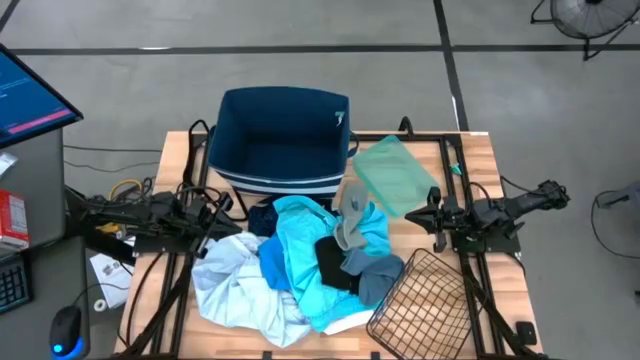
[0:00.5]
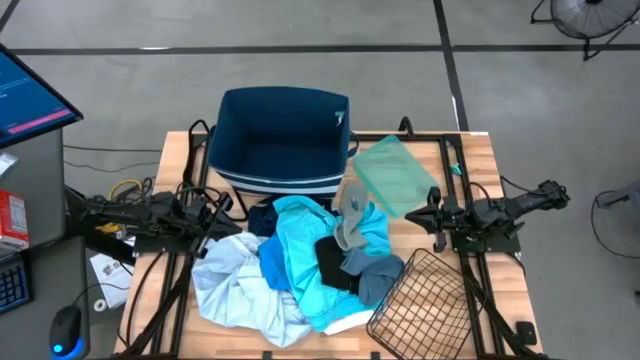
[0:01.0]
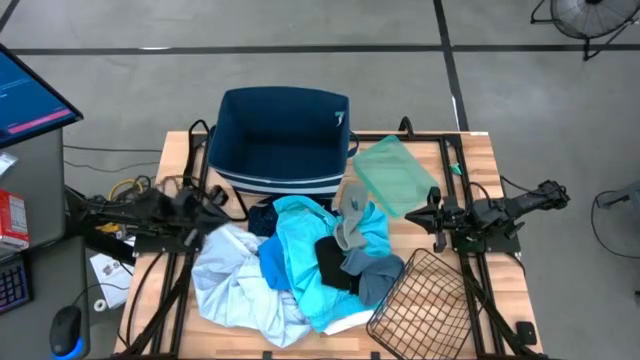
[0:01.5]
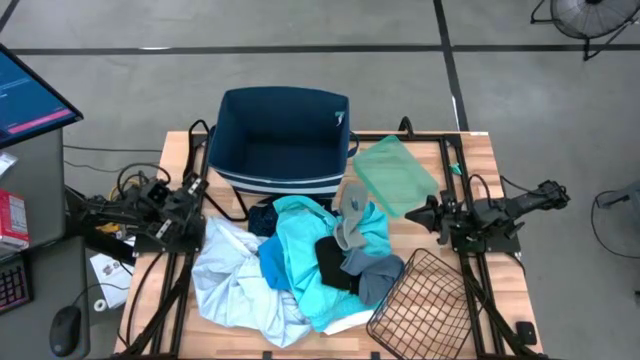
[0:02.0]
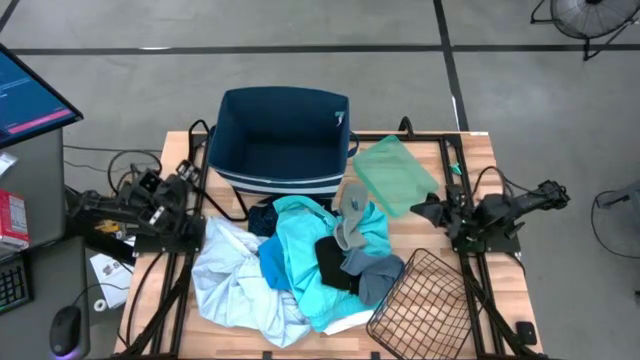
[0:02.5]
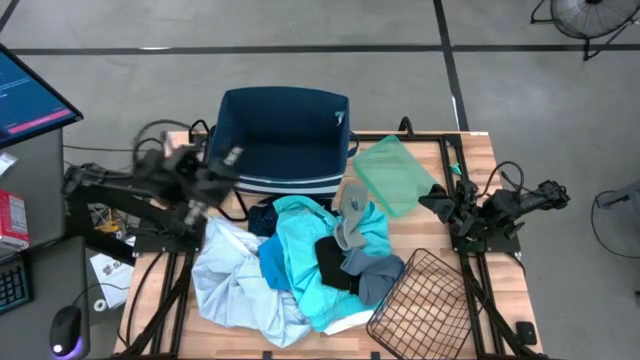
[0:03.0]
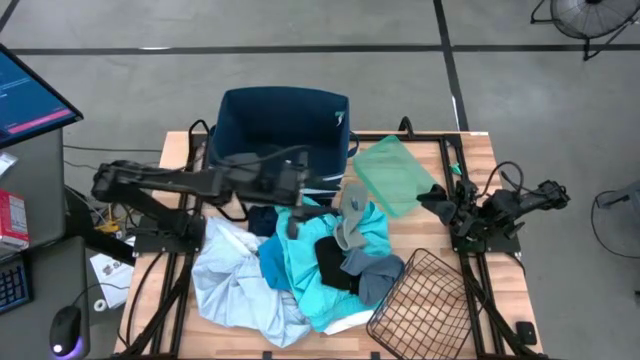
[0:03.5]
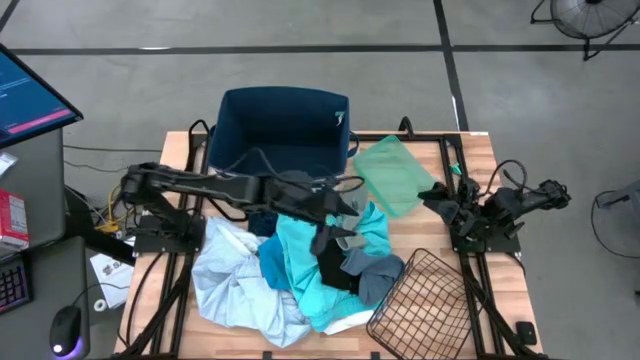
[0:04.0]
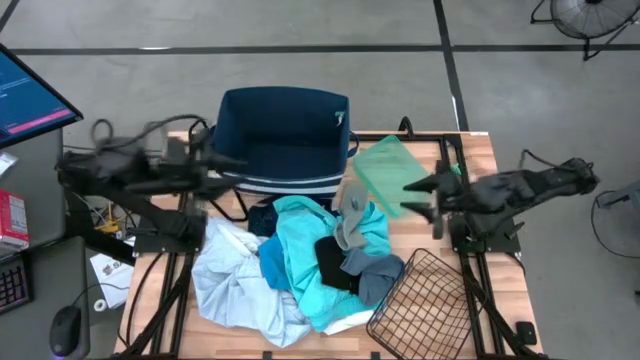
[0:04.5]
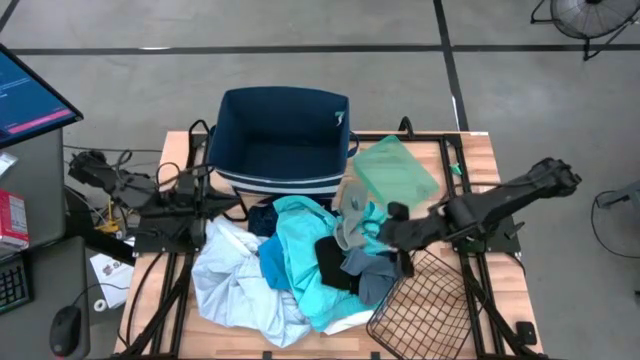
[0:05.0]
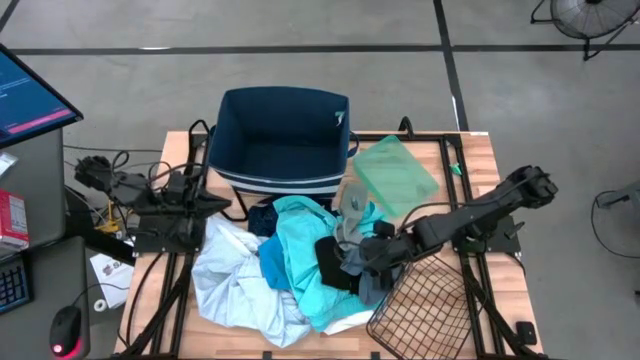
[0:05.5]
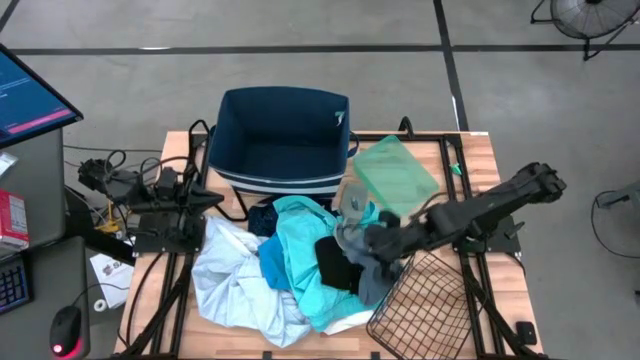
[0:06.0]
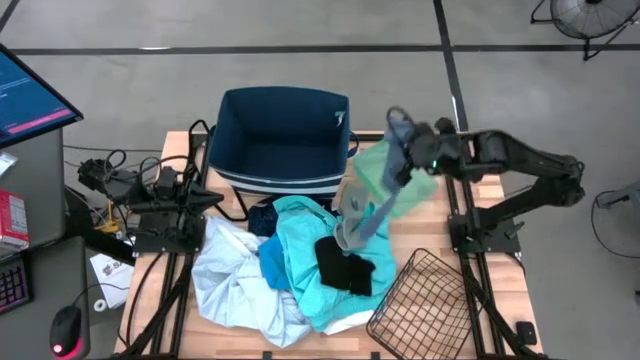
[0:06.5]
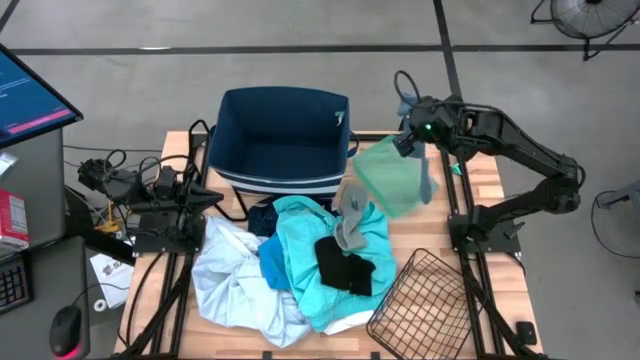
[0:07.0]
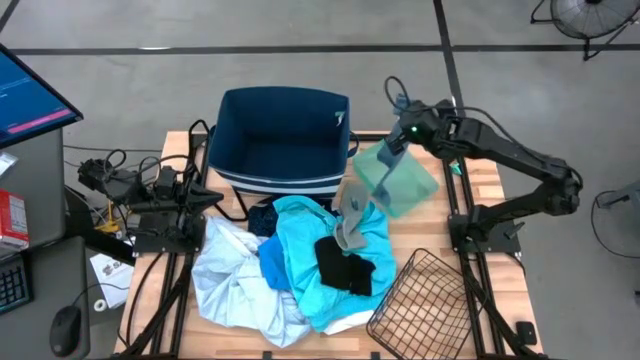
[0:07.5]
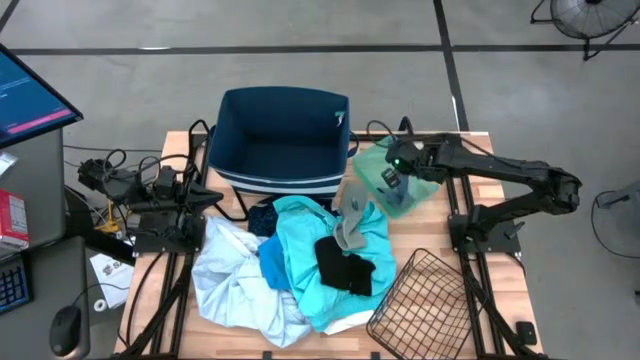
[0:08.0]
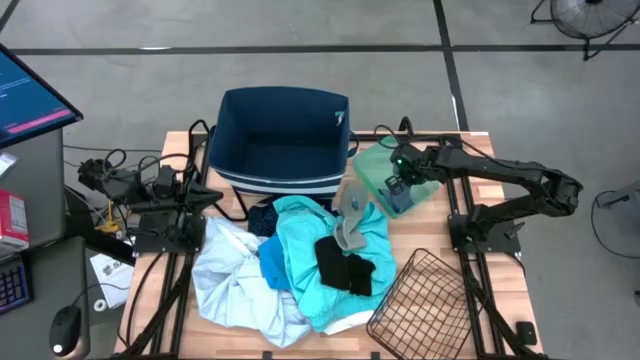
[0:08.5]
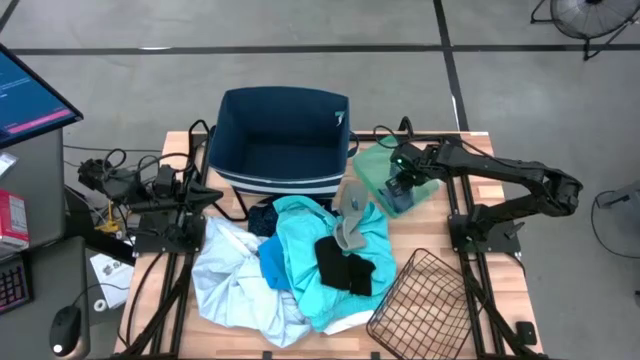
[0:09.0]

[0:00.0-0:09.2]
Task: Pick & Place Cloths
Put the blue sock into the green bin

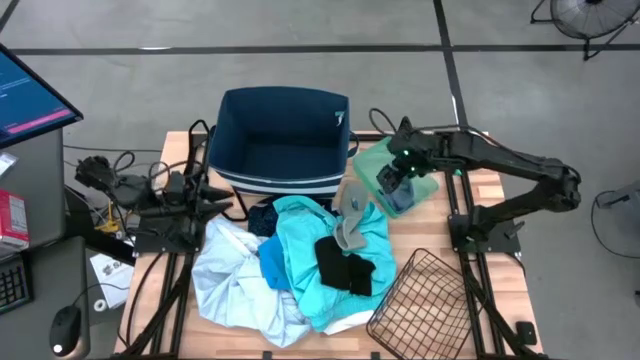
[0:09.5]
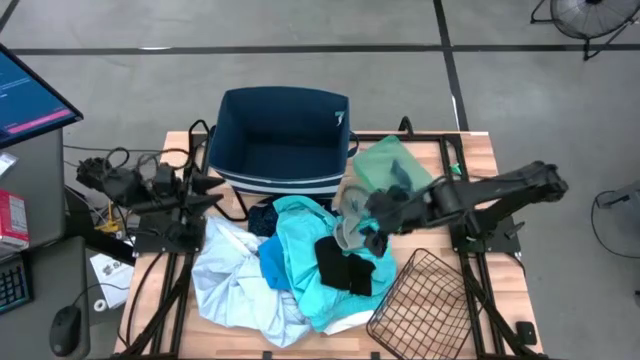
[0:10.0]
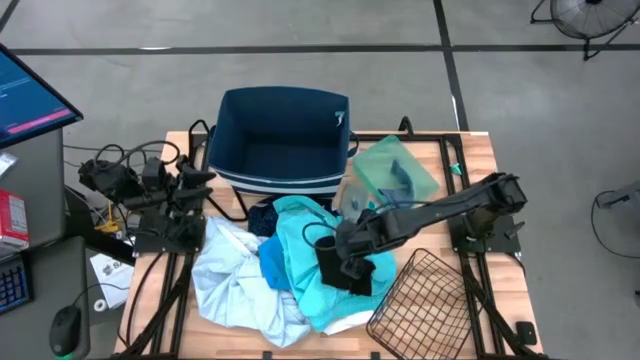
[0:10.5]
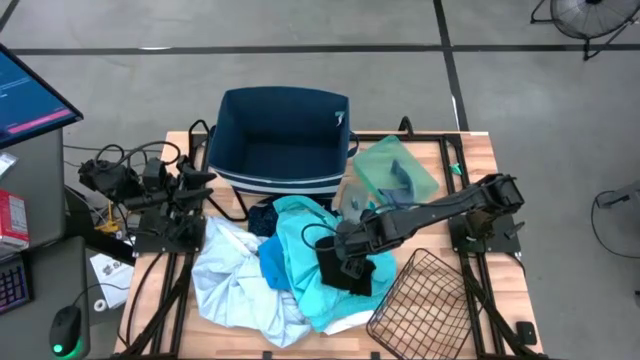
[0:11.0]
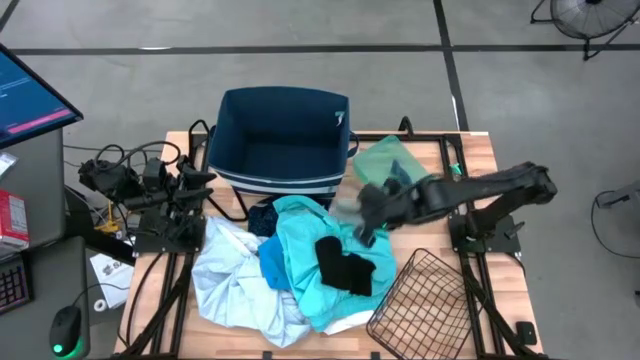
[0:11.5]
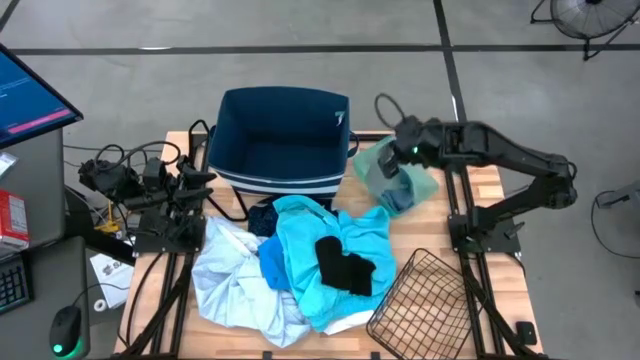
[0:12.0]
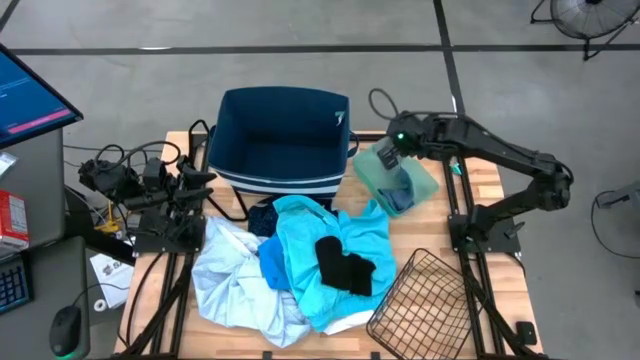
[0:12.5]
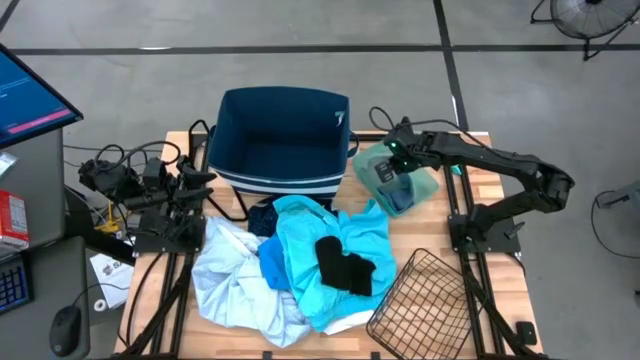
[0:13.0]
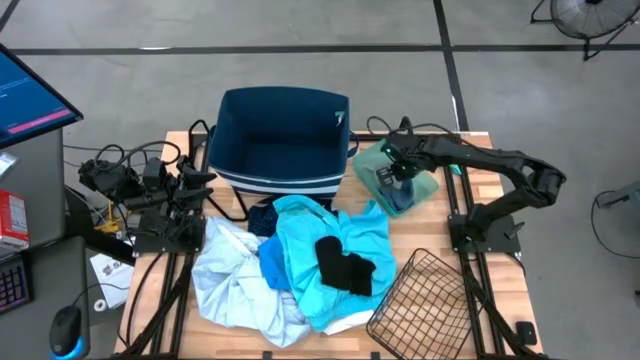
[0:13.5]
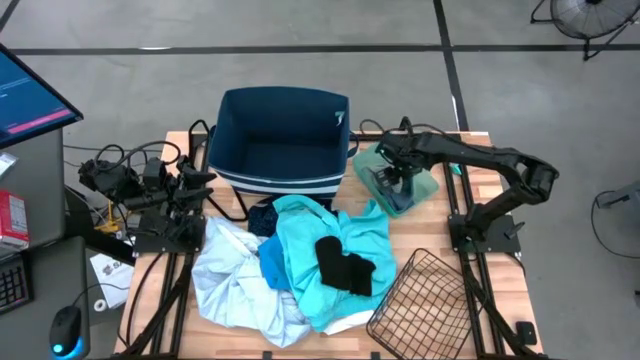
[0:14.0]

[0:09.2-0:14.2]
Put the gray sock into the green bin

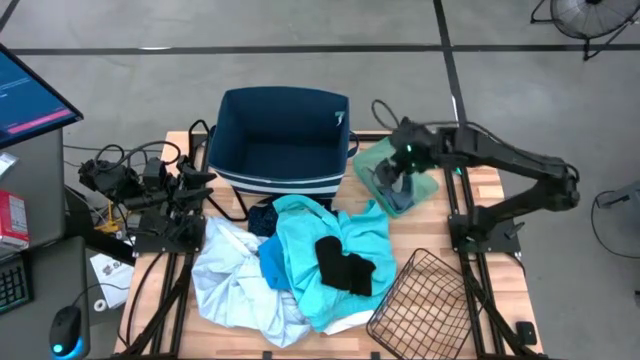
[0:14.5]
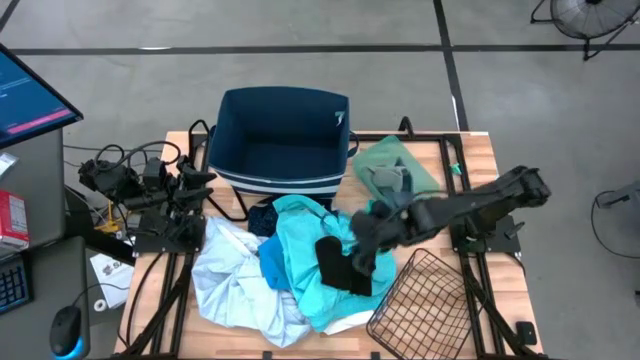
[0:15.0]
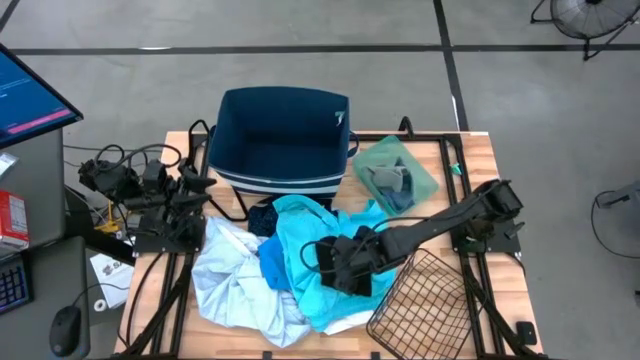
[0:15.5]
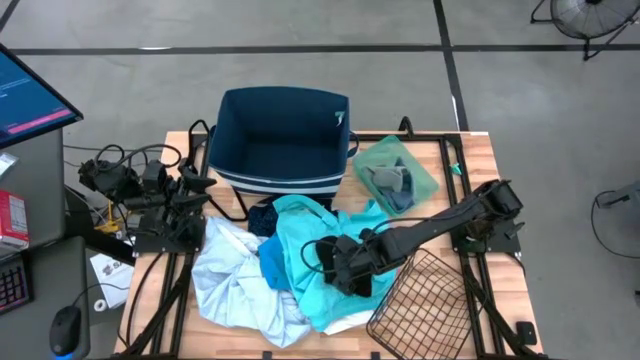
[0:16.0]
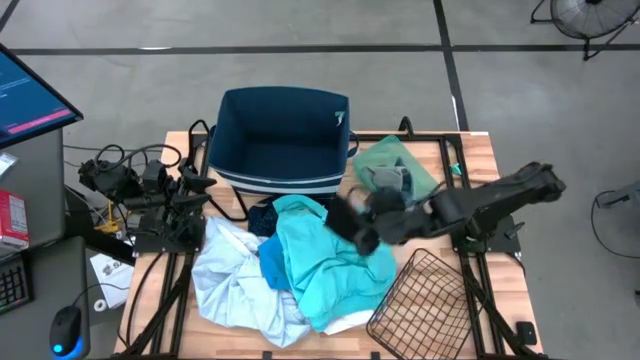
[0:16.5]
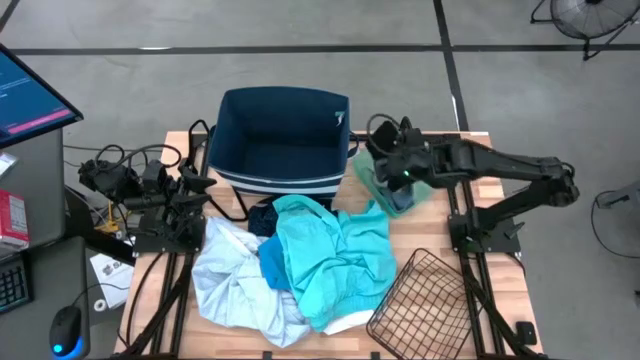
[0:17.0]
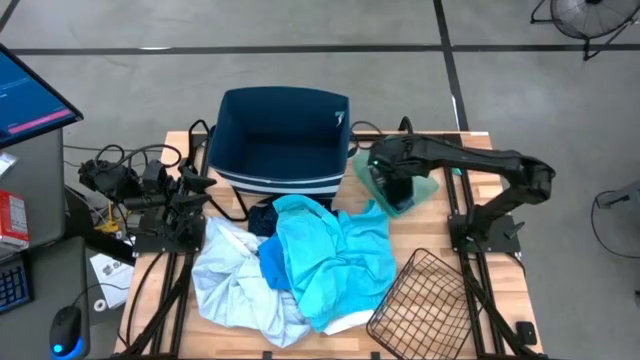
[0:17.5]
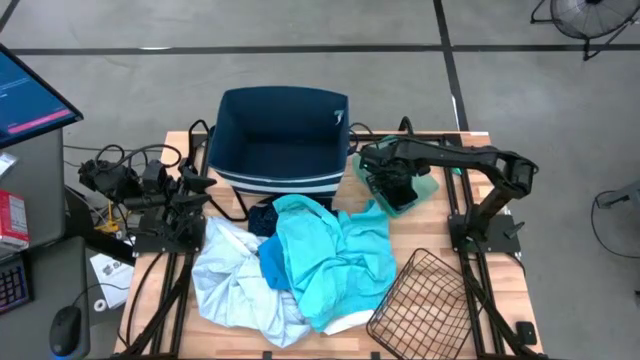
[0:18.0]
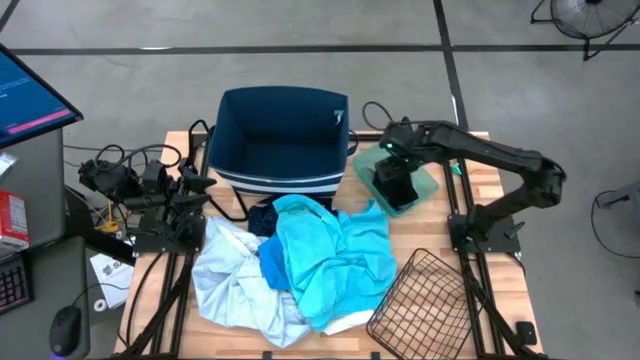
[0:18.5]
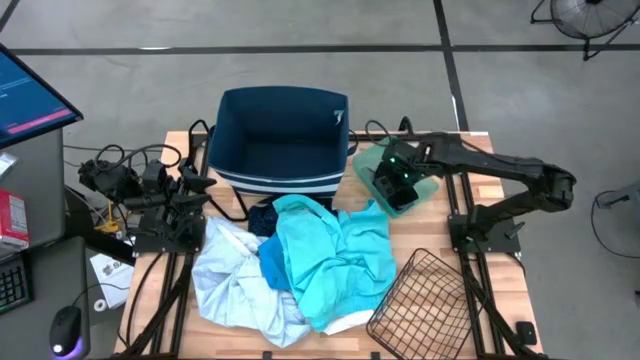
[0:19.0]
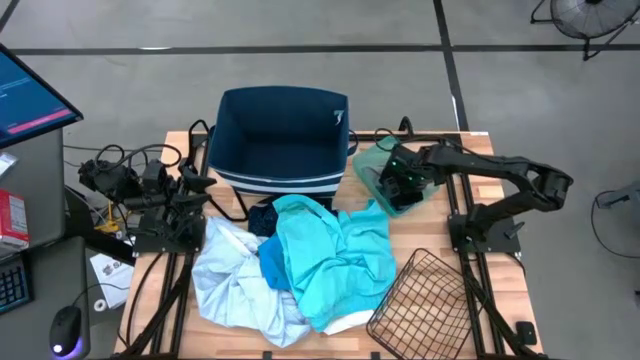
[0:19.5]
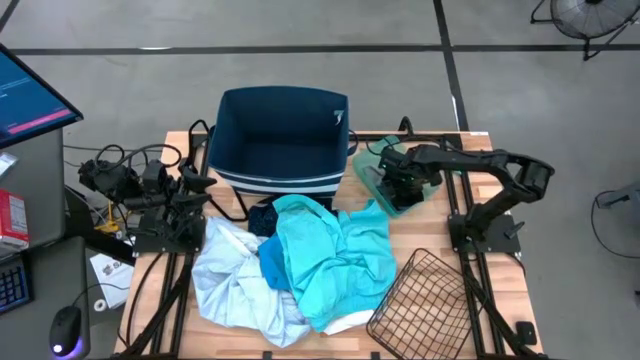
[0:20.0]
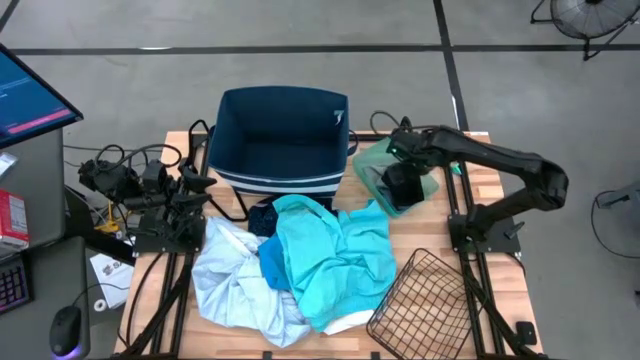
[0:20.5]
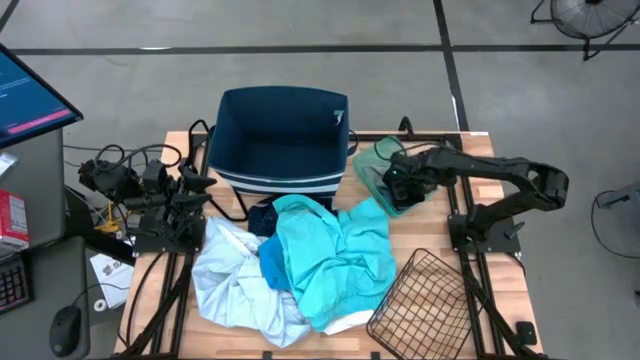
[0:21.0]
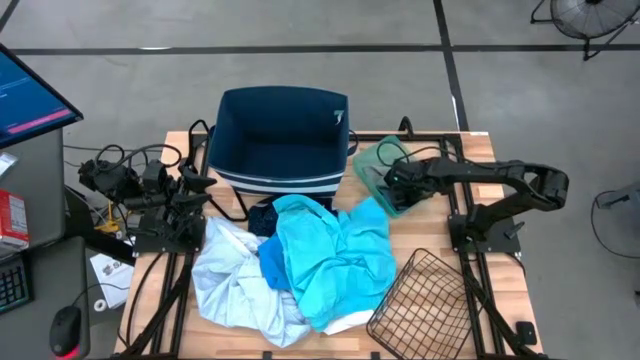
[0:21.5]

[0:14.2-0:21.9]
Put the black sock into the green bin
